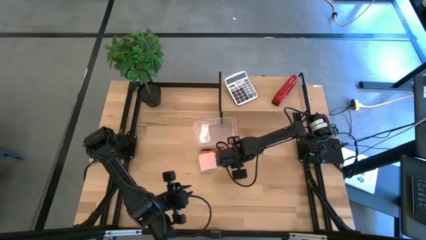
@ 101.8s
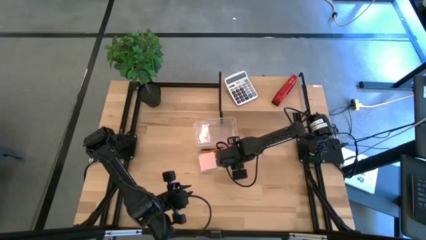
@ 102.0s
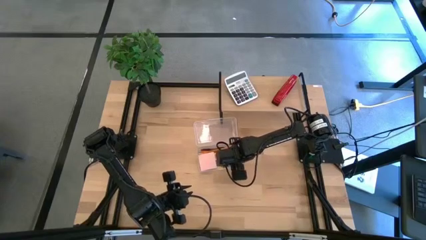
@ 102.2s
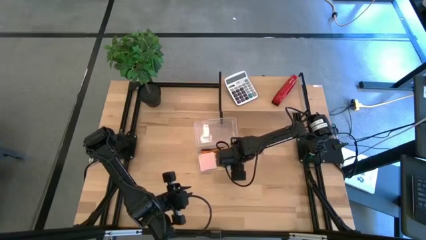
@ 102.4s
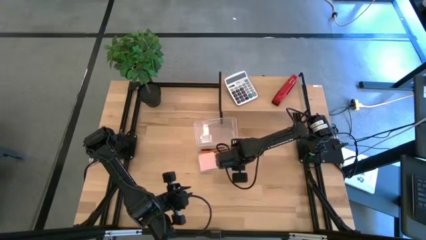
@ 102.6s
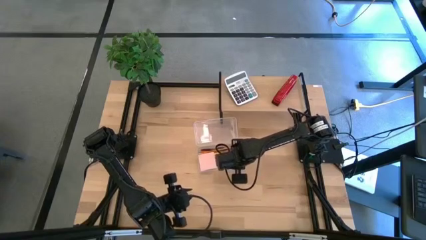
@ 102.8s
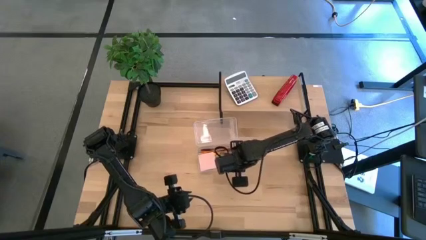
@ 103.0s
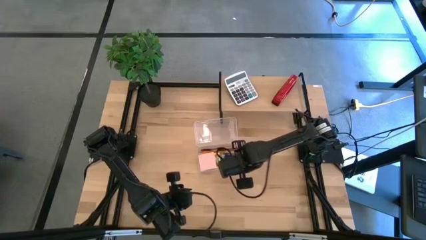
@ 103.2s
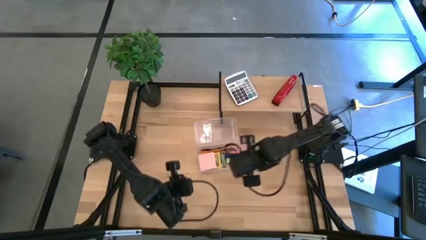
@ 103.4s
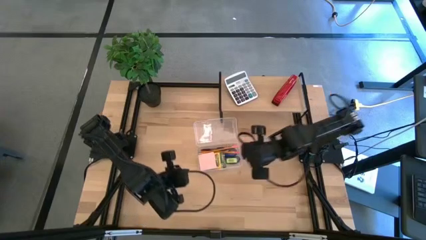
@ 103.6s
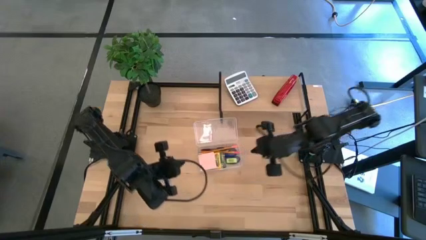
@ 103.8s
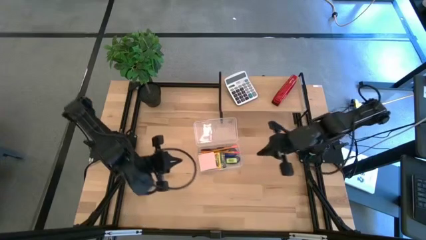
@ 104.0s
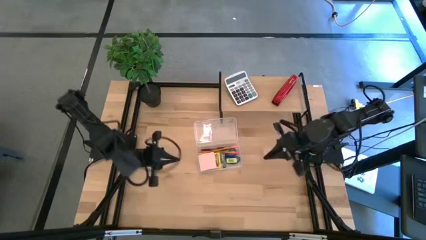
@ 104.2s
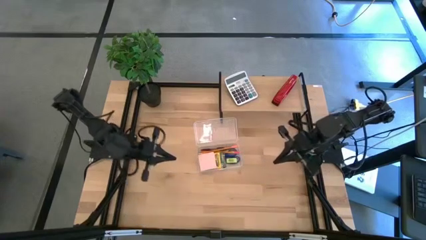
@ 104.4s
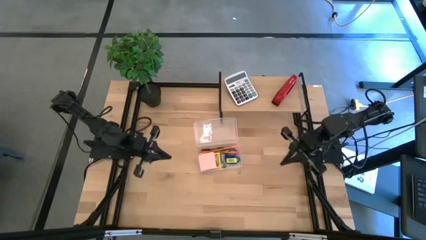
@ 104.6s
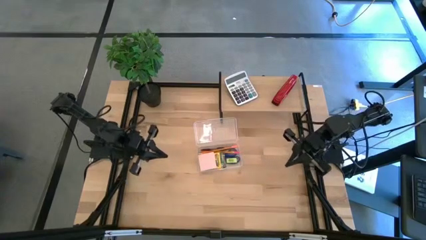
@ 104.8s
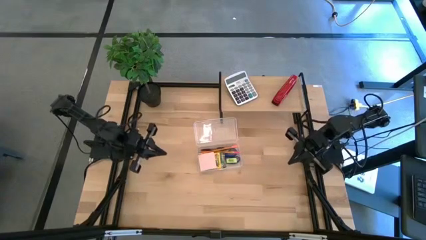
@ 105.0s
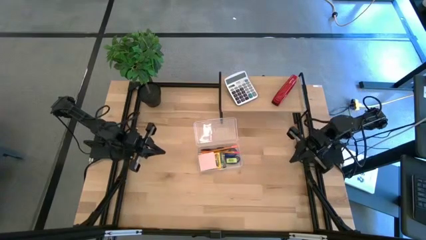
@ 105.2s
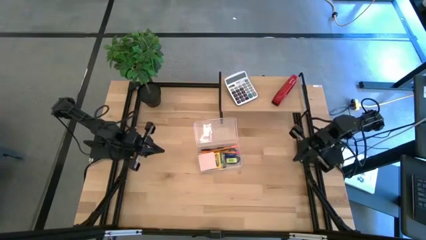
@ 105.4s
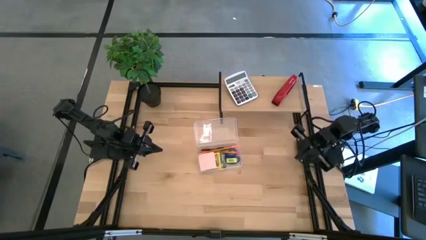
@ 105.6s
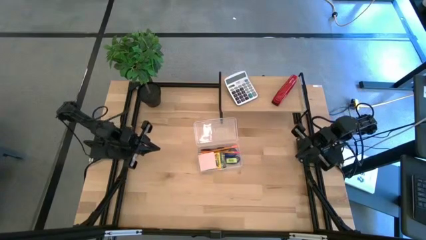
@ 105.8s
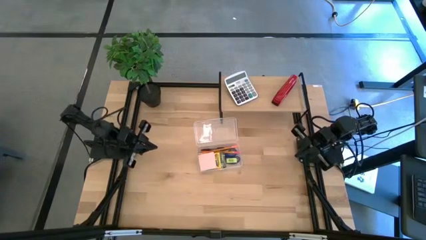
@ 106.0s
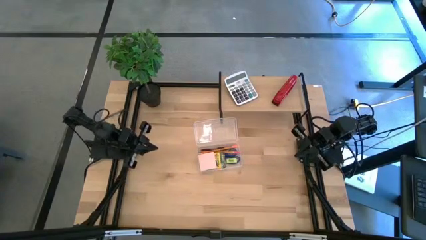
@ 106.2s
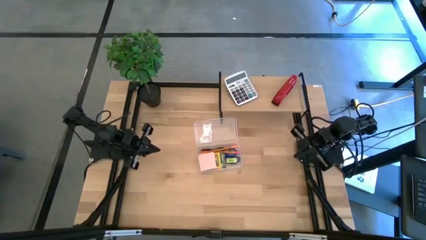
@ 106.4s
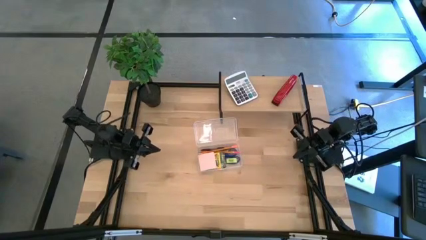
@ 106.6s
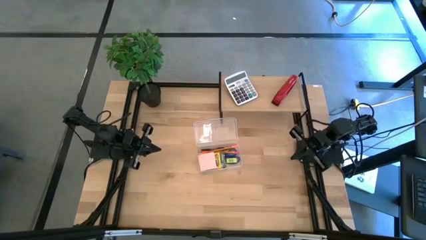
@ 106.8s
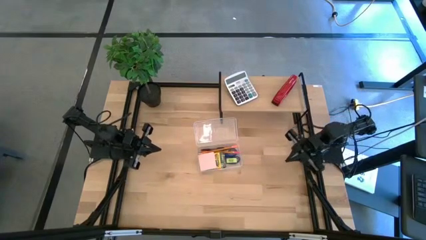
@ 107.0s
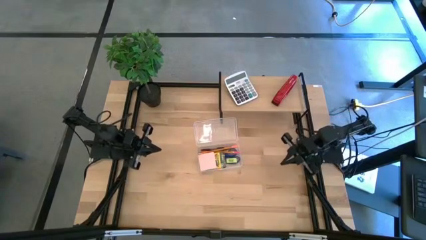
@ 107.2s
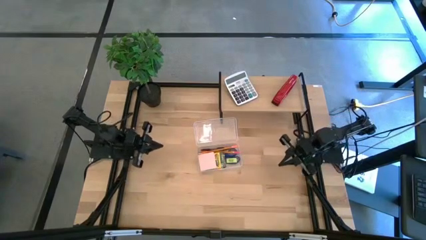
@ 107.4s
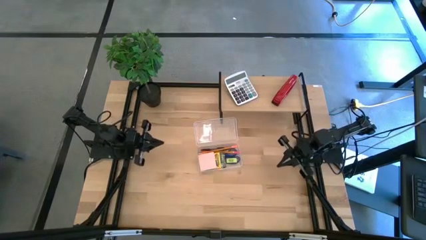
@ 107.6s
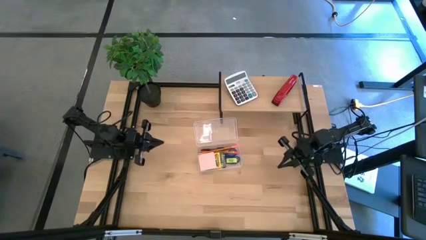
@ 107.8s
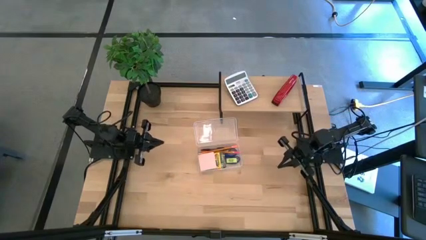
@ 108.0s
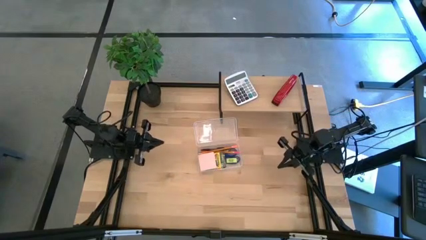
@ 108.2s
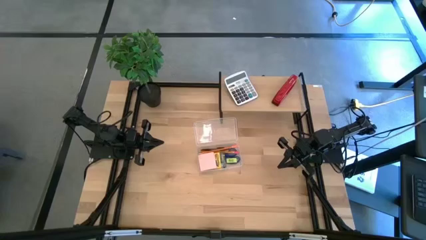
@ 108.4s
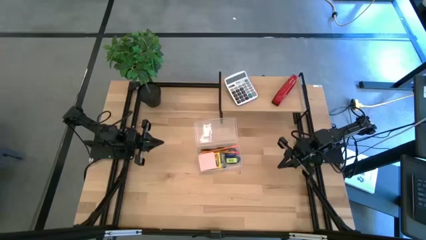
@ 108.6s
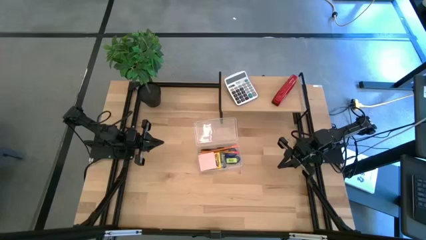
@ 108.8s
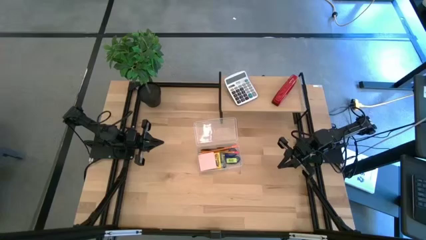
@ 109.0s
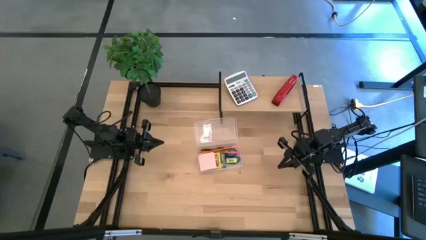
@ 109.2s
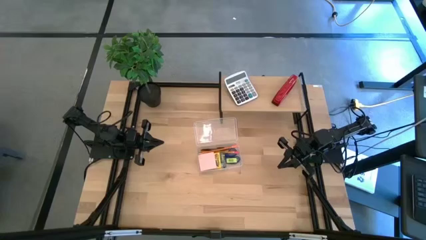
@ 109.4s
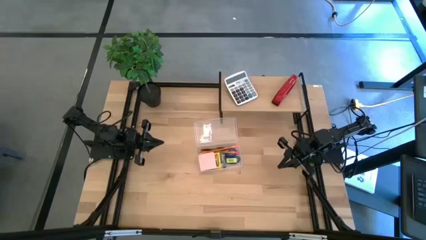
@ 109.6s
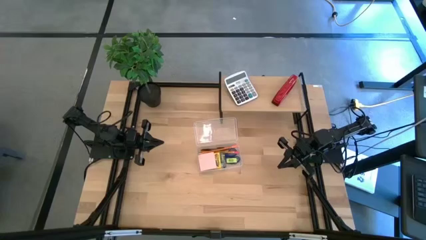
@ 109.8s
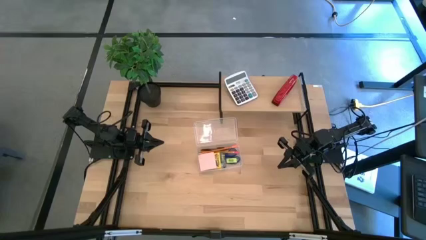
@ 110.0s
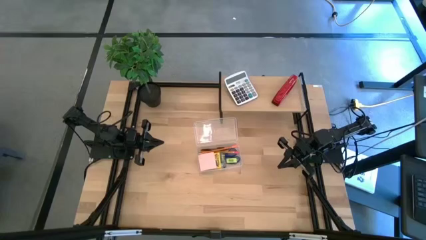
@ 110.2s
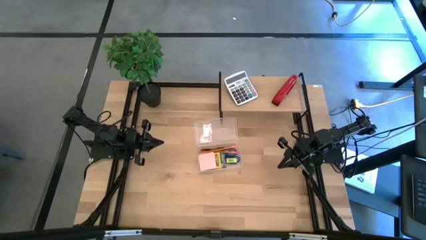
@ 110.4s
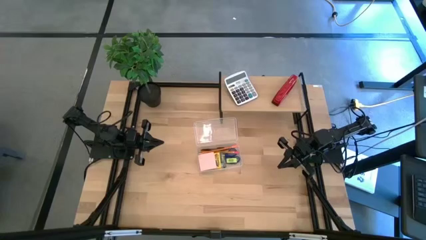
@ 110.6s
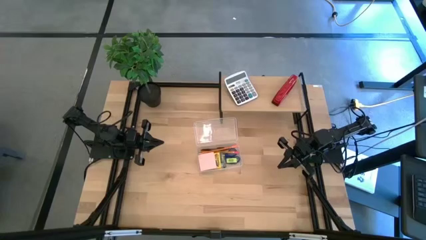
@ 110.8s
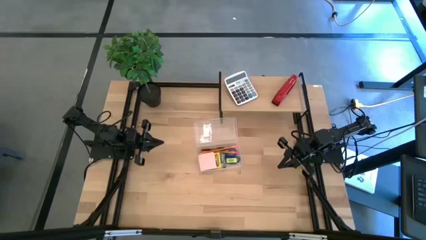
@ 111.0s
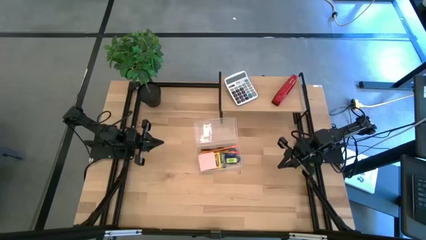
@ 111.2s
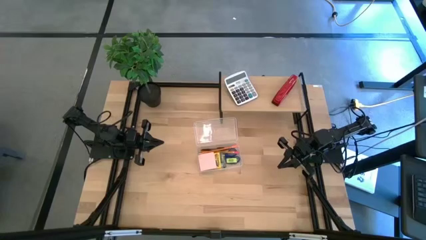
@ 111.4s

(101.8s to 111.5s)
Task: Pack school essentials
Return to Home Position

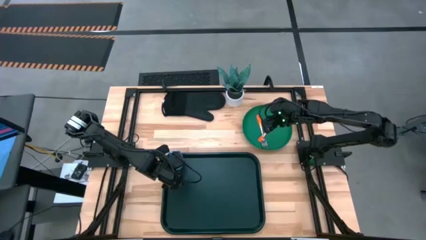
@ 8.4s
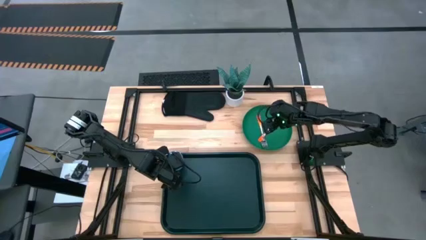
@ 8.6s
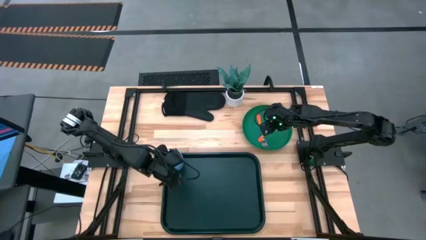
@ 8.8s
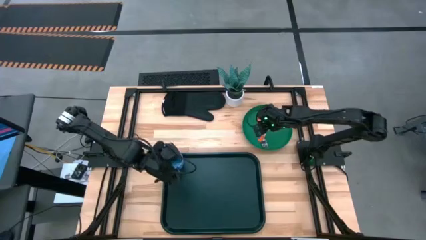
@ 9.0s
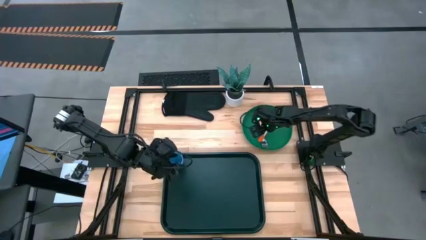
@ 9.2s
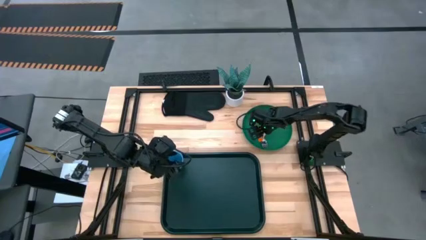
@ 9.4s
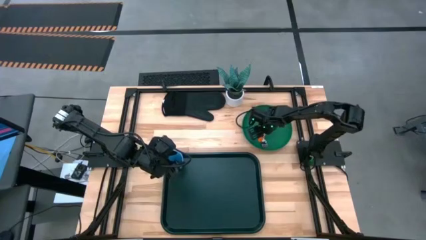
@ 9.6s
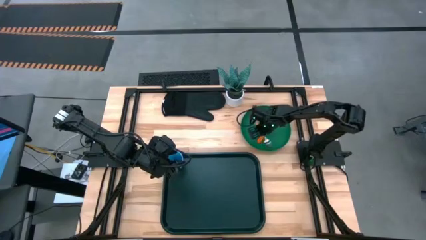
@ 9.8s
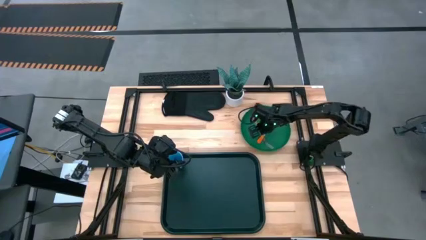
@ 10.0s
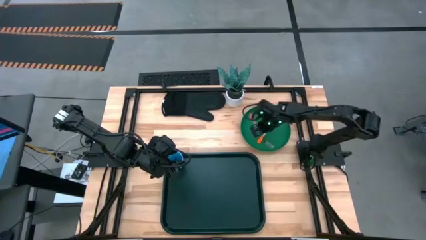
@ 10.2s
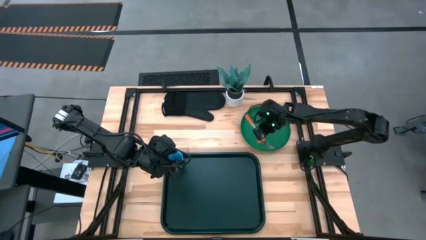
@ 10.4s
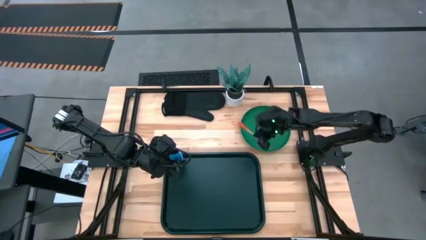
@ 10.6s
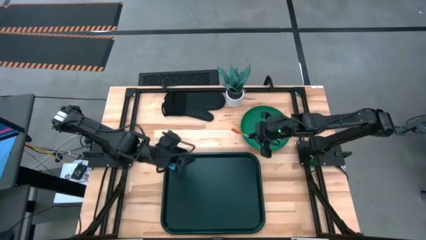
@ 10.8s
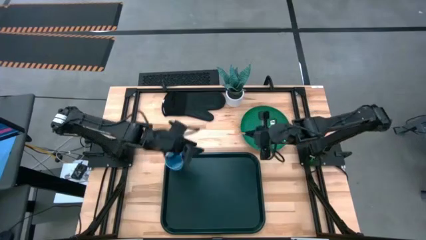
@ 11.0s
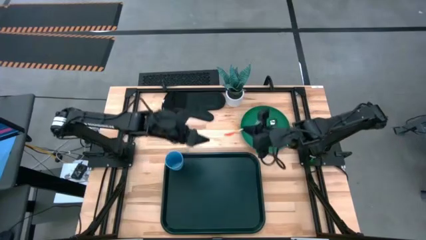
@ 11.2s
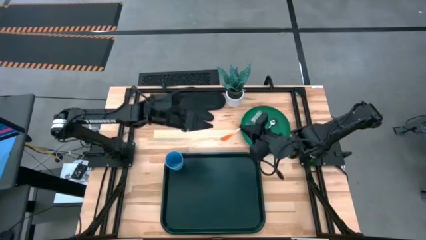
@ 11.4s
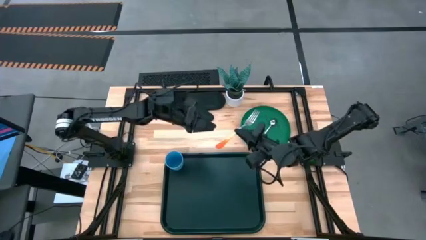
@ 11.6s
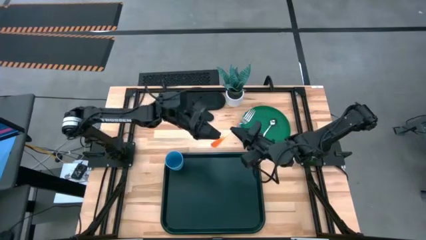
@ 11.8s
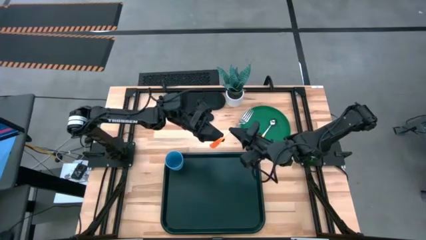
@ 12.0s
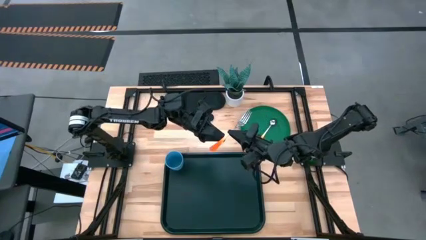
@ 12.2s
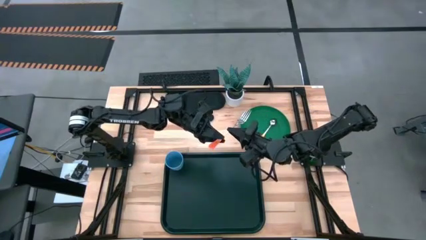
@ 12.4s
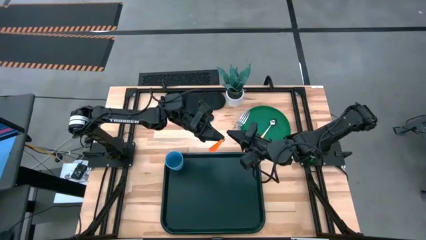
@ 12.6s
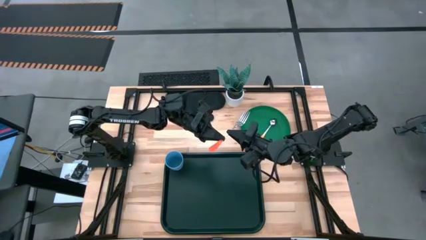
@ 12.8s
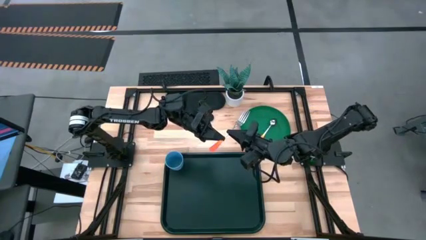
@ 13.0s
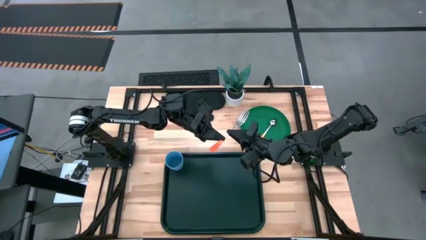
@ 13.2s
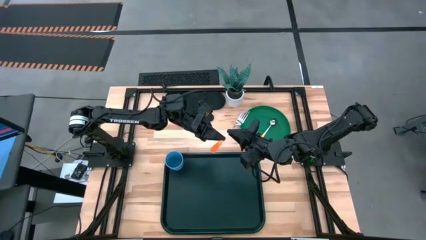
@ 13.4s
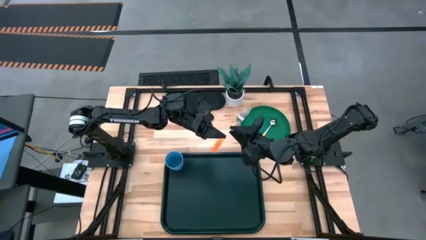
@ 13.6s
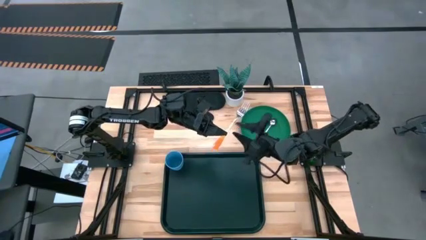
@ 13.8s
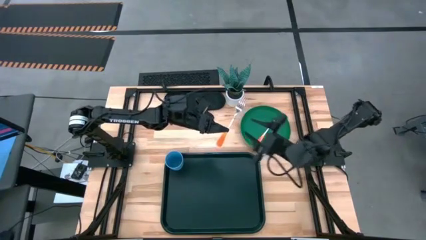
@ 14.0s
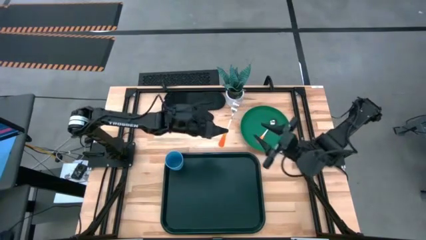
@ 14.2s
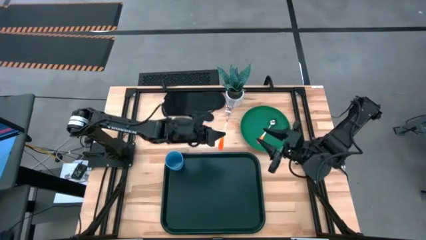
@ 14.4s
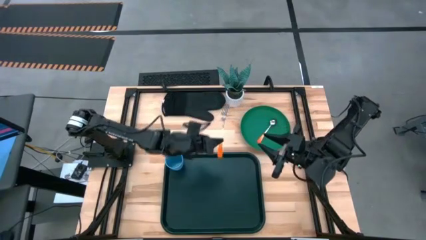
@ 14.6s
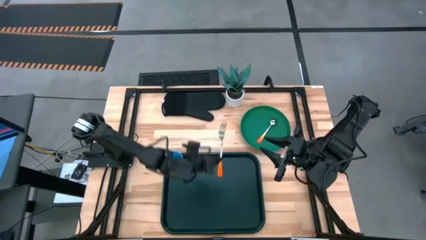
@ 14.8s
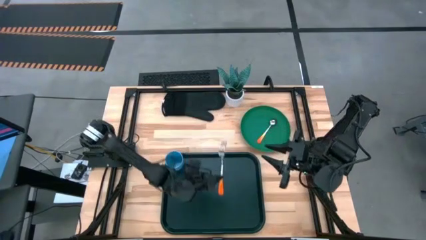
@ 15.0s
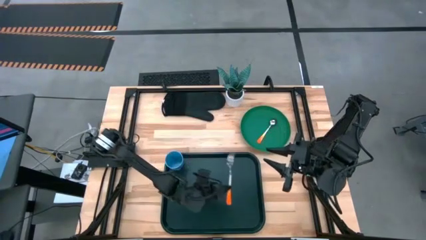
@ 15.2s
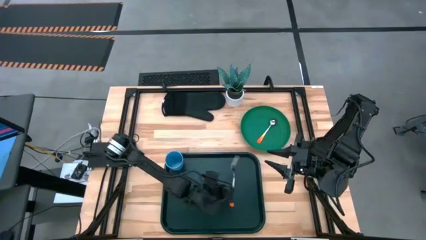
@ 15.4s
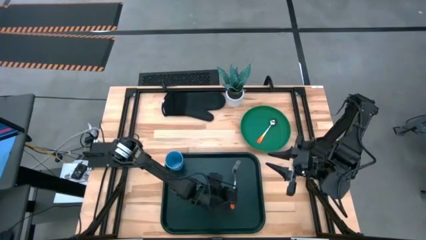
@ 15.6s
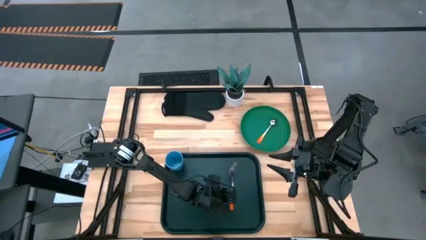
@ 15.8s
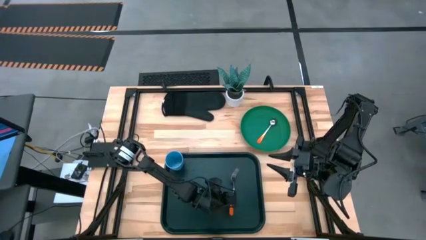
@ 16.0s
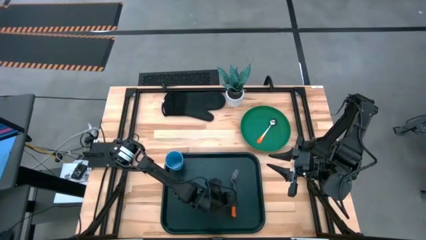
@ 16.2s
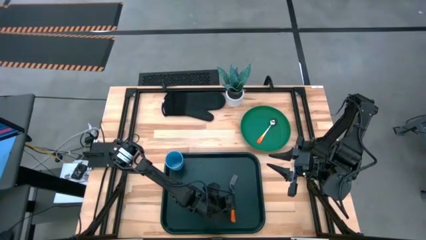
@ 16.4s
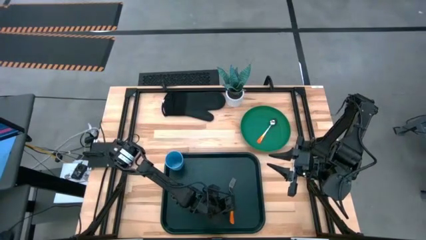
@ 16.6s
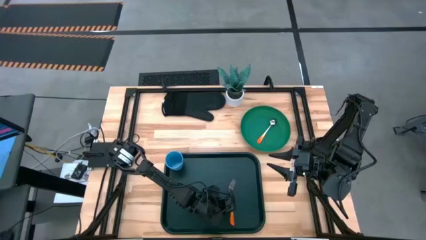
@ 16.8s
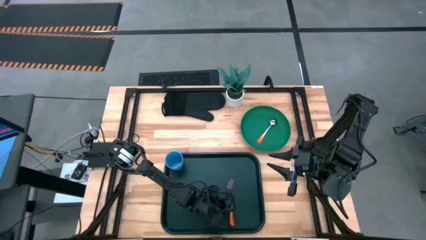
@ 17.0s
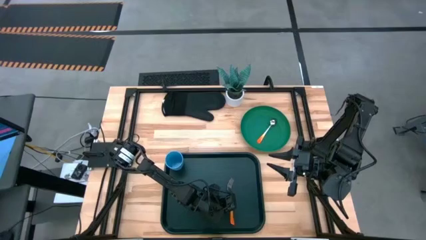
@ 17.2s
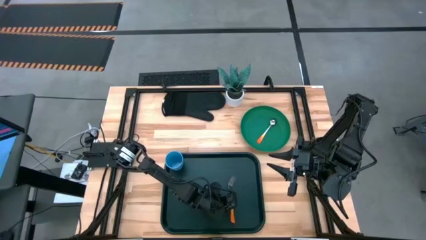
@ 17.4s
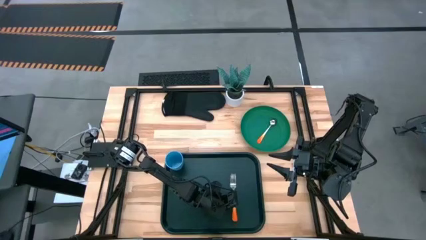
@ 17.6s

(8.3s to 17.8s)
Task: Pick and place plate/cup/fork/spoon on tray
Put the orange fork on the bottom right of the serving tray
